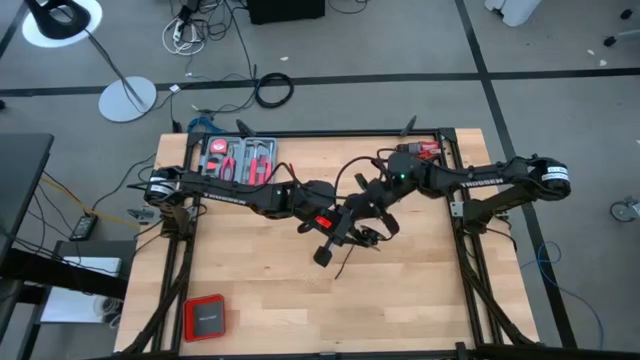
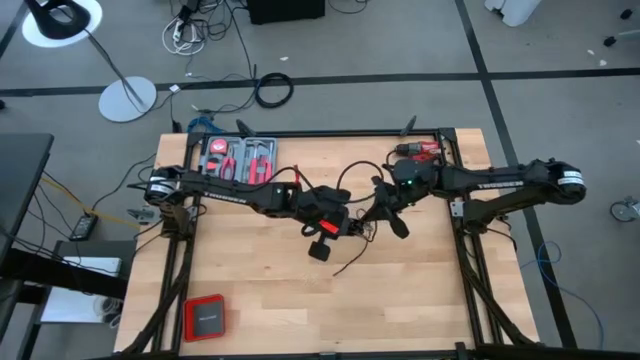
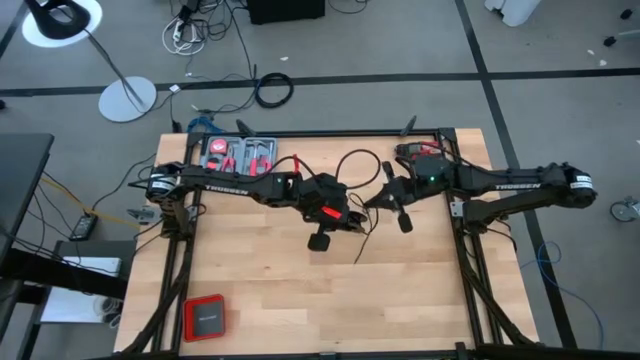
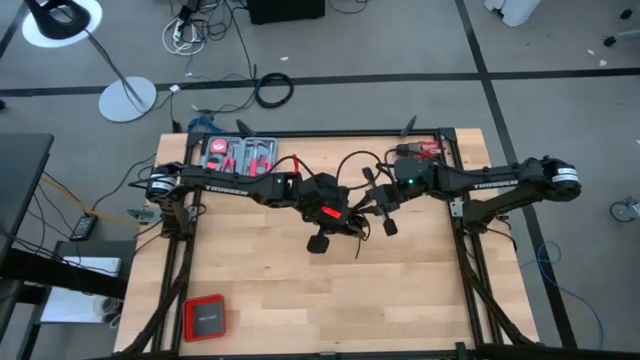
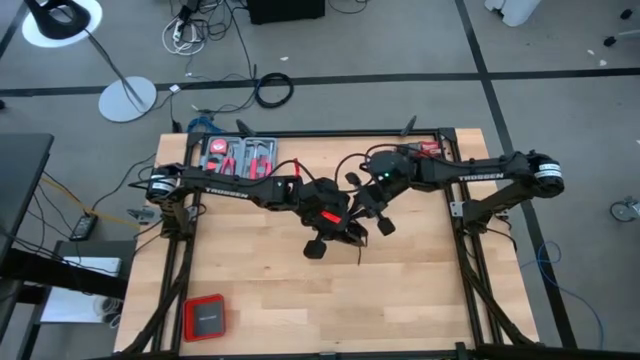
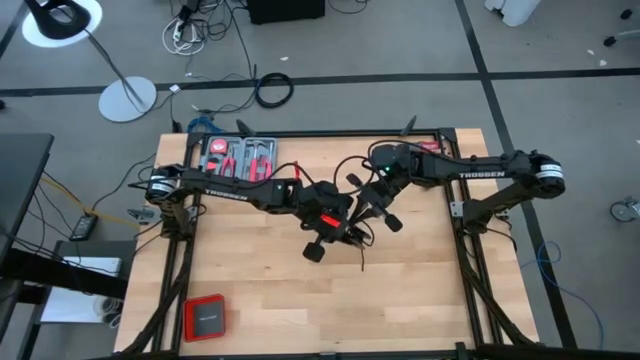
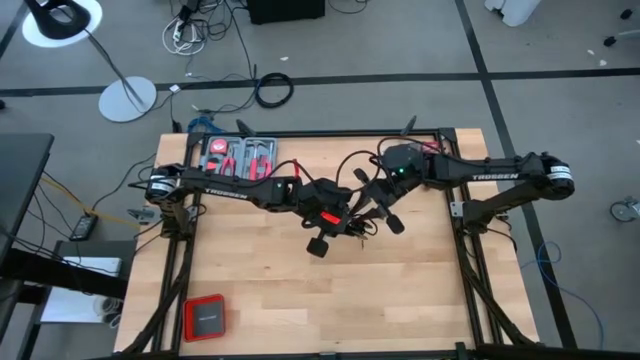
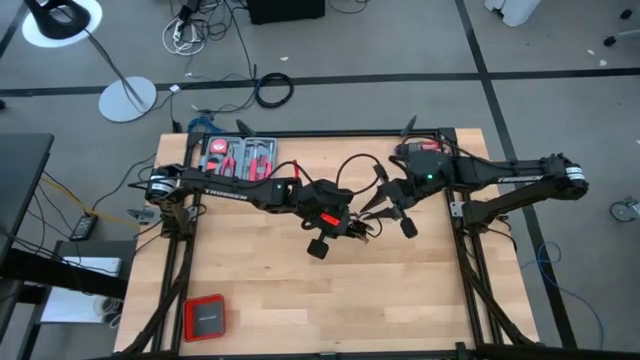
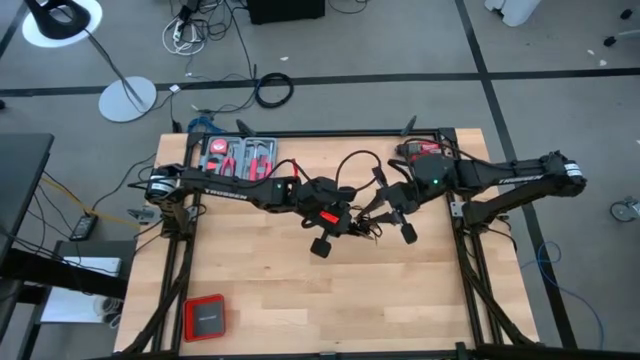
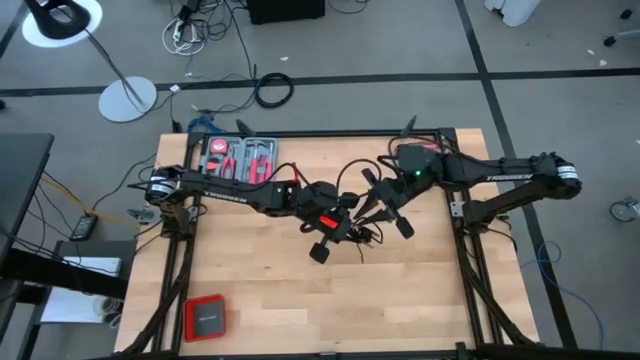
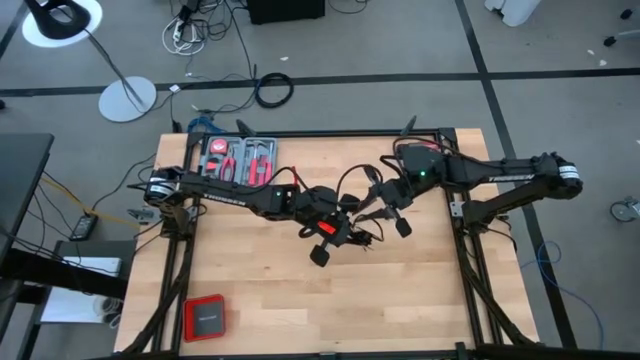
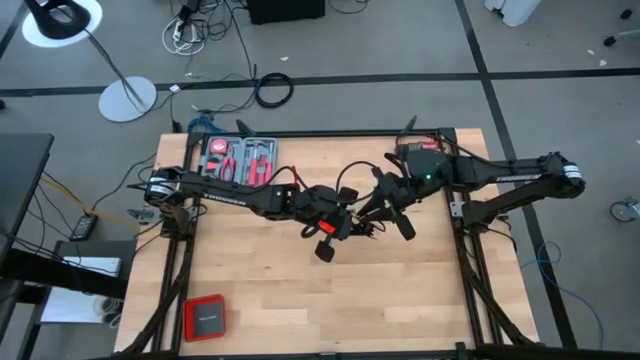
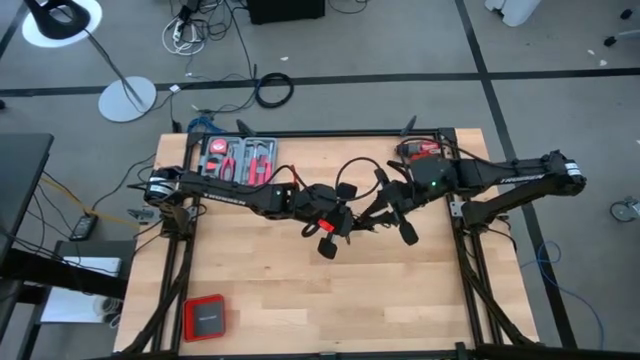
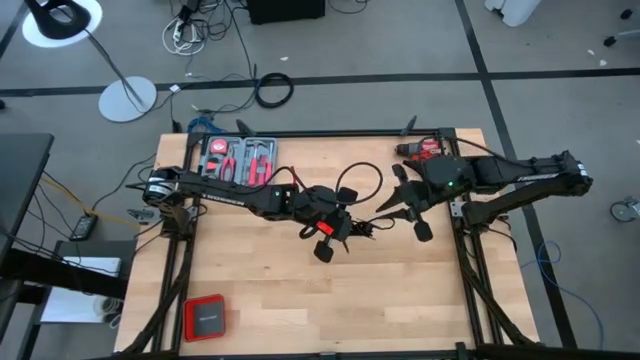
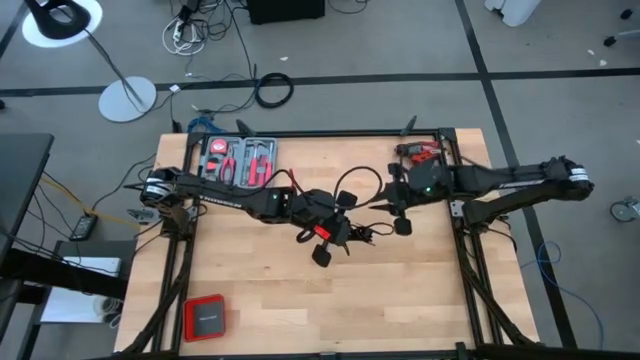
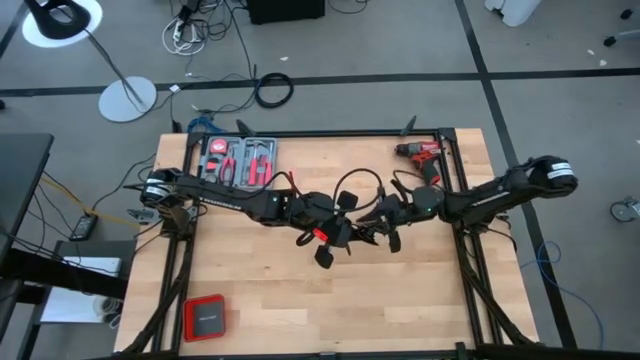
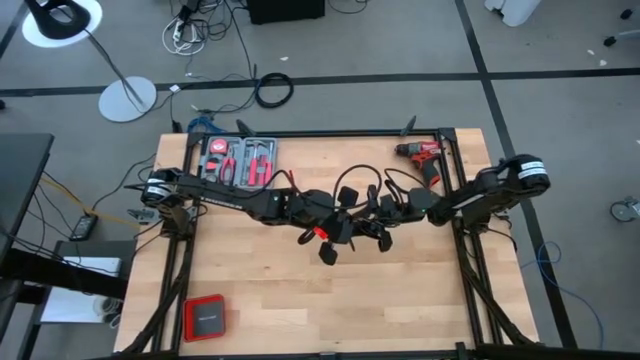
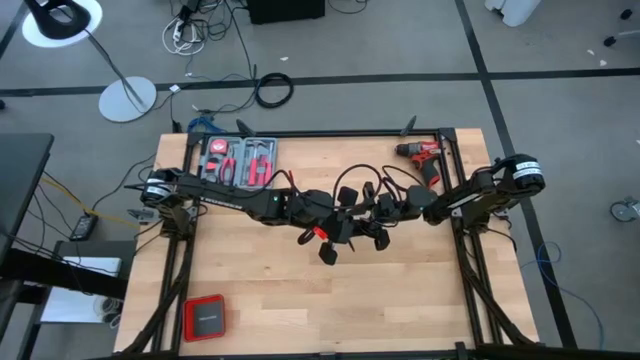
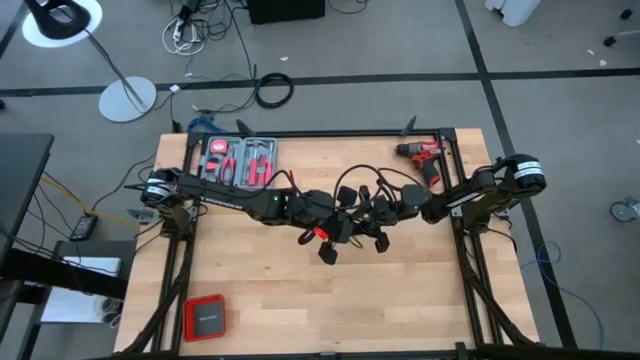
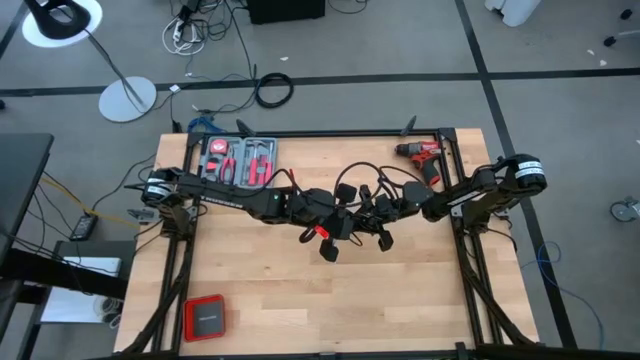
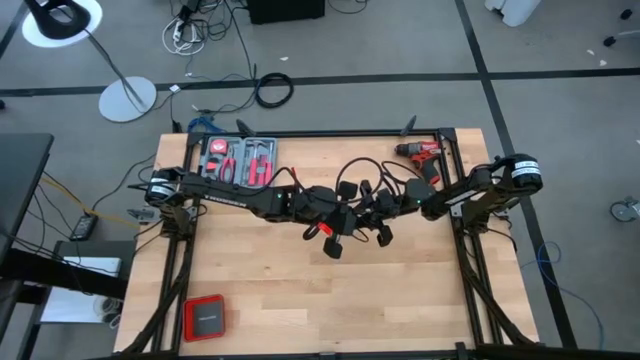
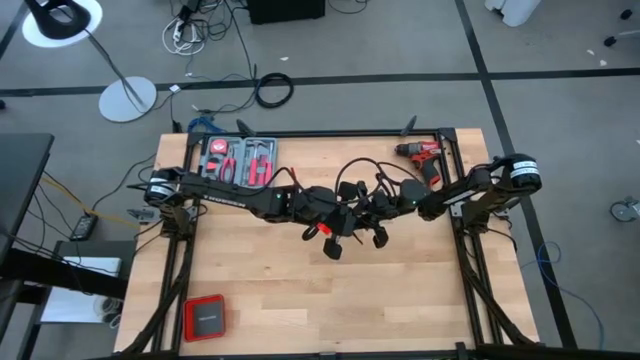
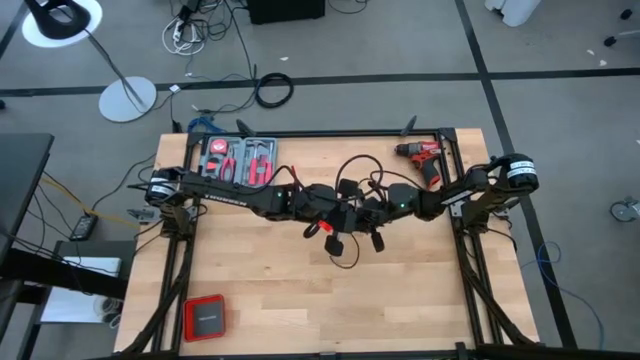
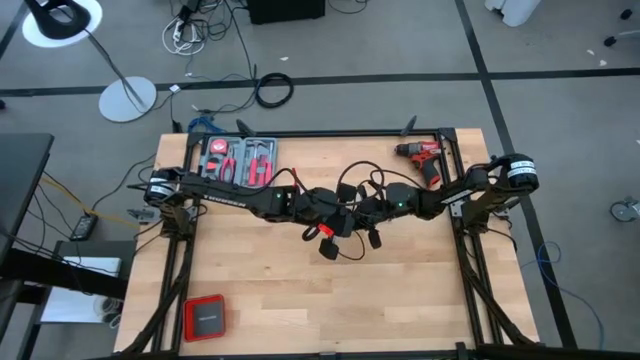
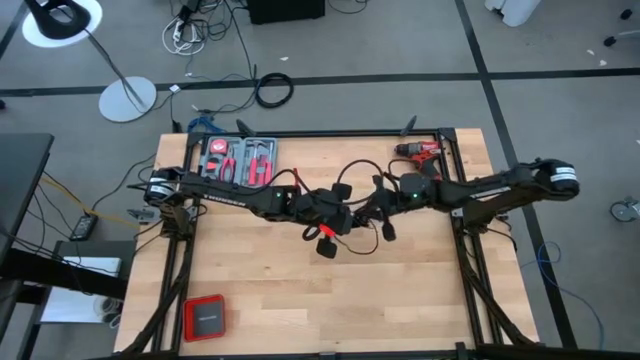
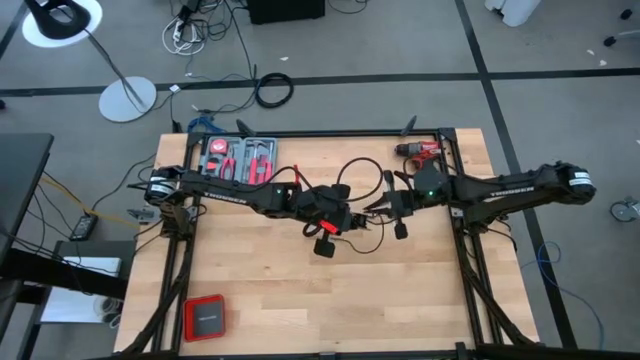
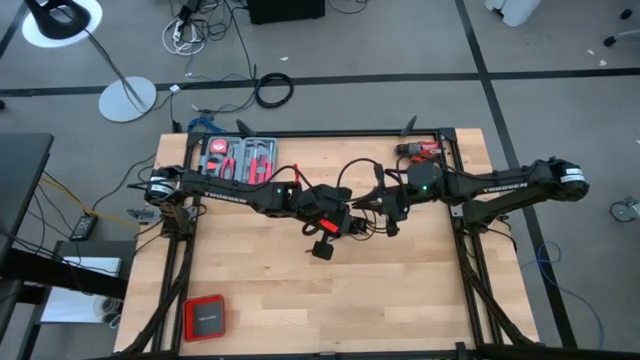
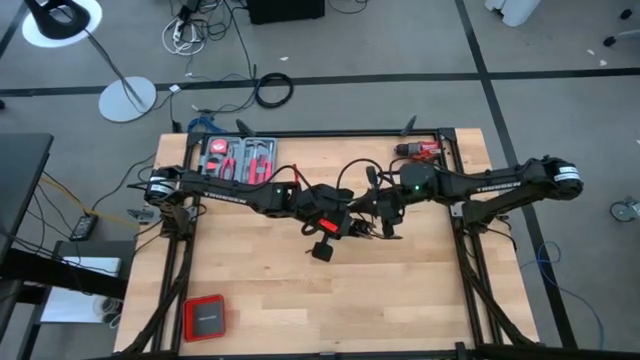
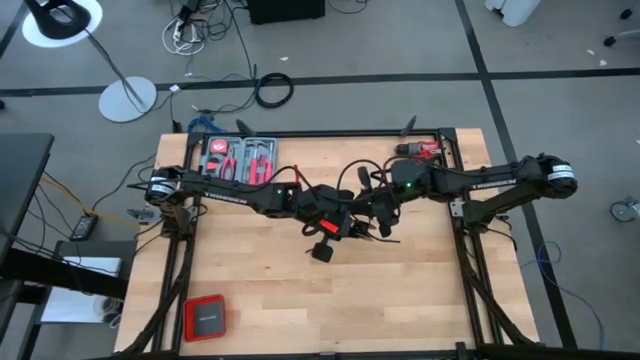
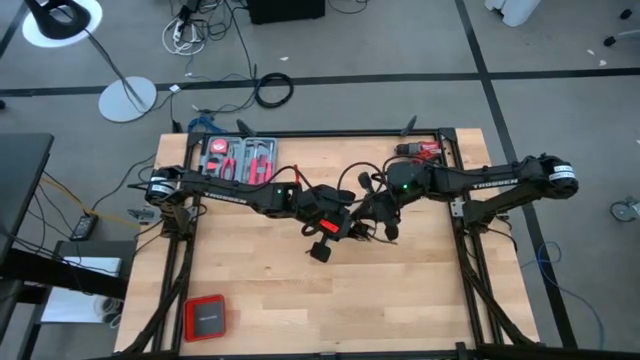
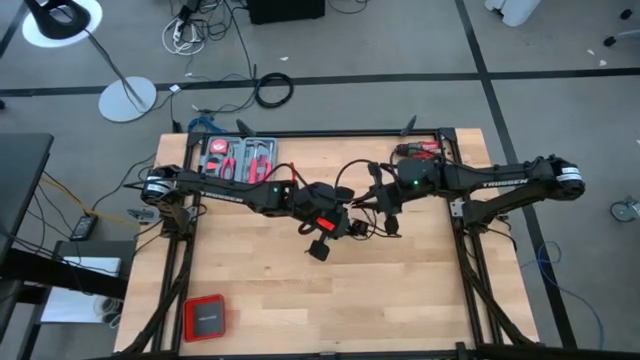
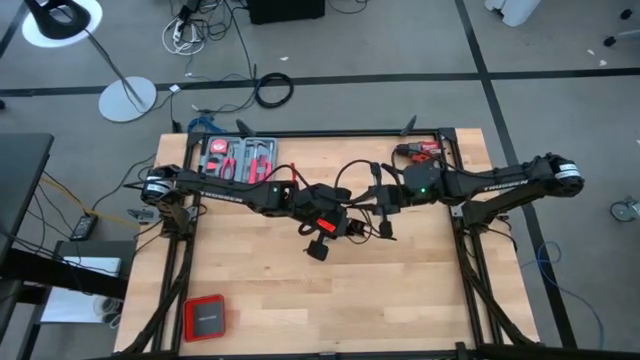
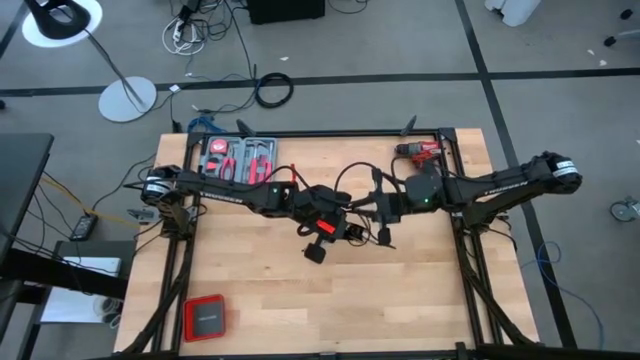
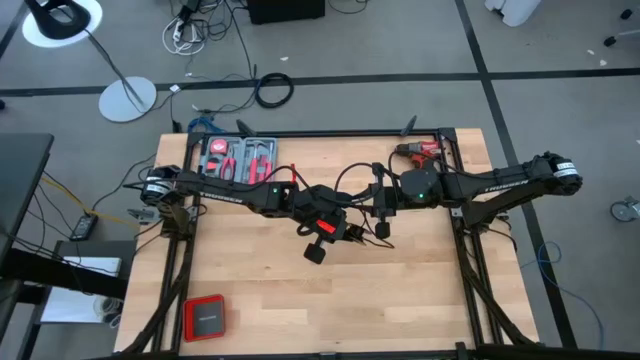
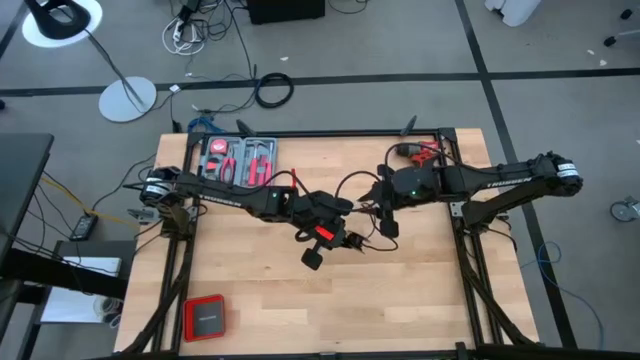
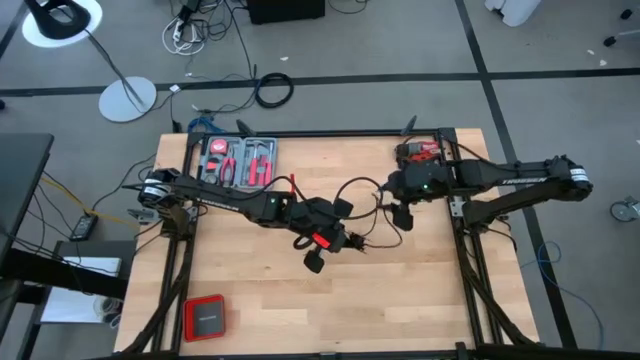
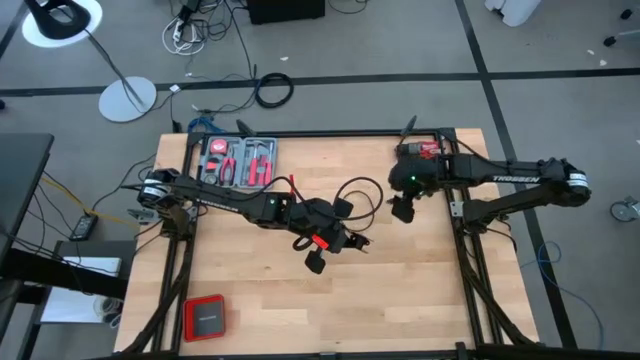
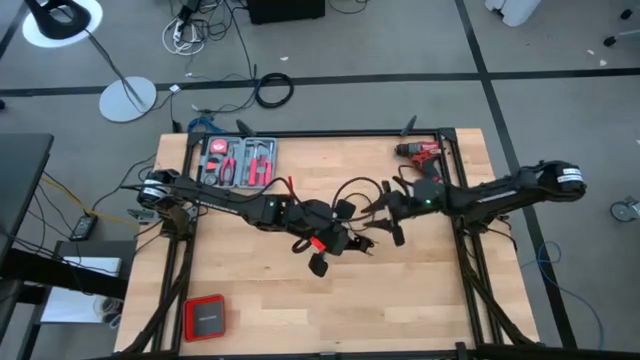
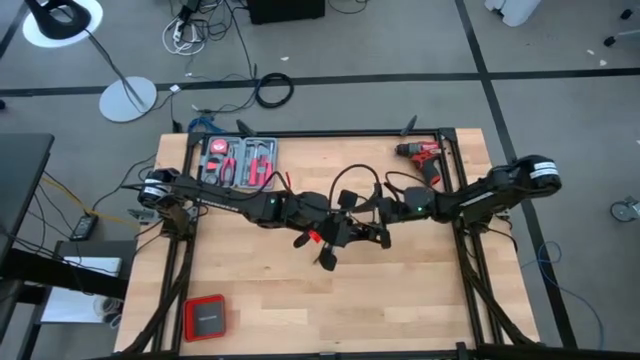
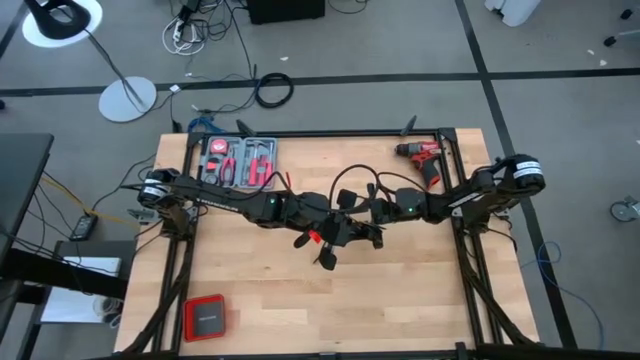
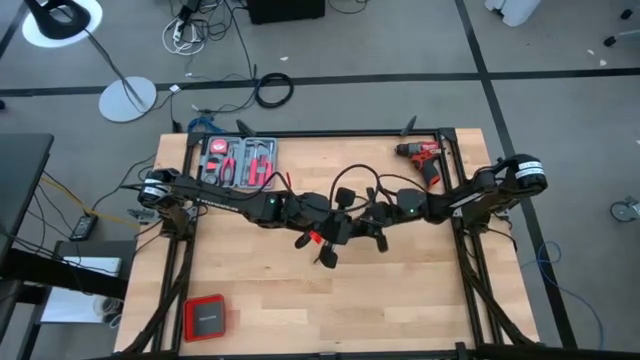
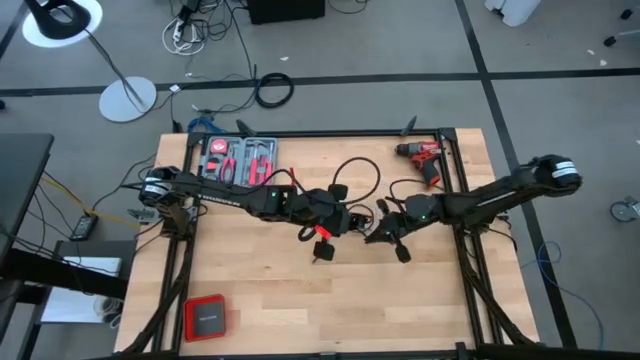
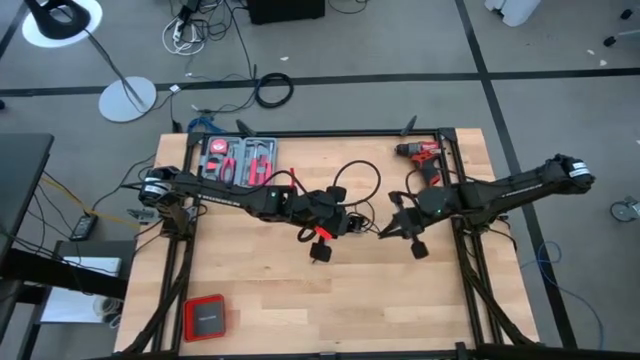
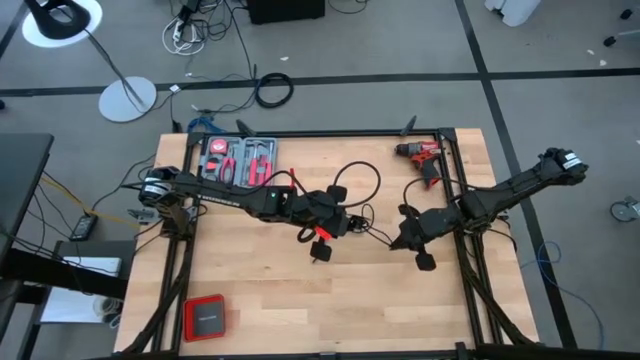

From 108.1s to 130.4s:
Task: Coil cords
Coil the black wire on the spool
